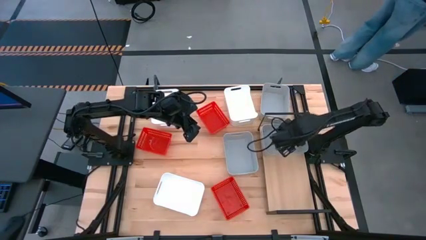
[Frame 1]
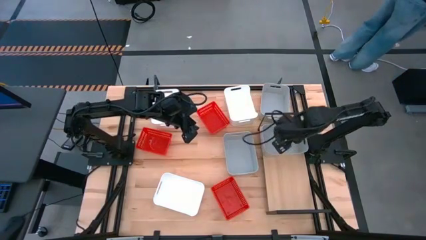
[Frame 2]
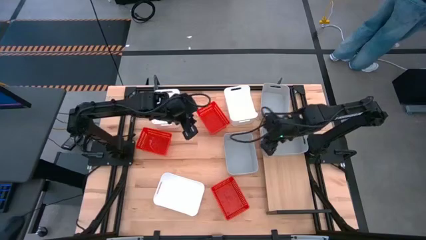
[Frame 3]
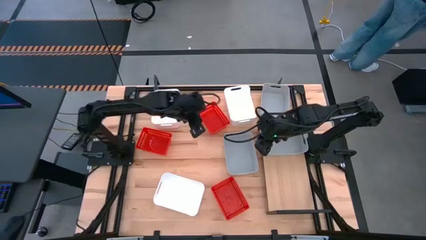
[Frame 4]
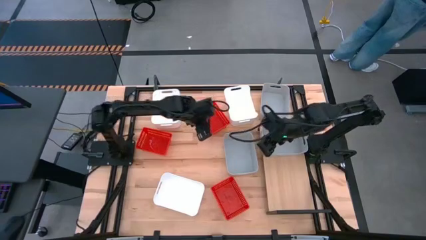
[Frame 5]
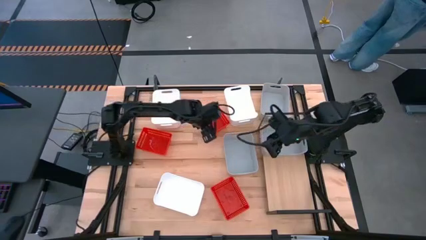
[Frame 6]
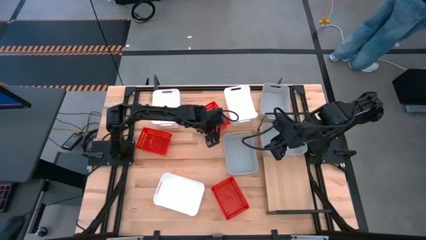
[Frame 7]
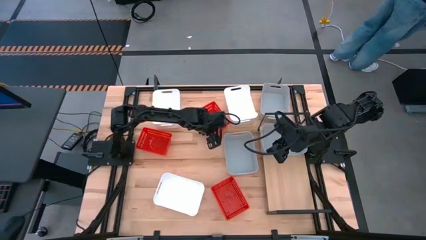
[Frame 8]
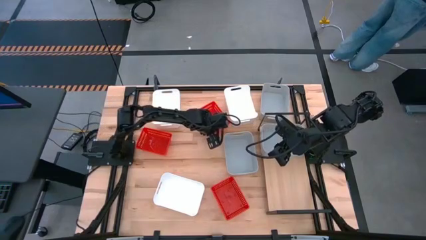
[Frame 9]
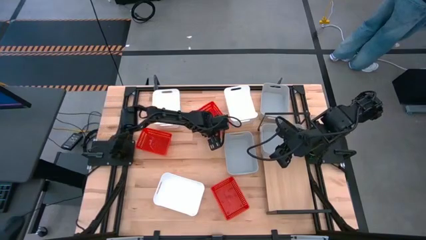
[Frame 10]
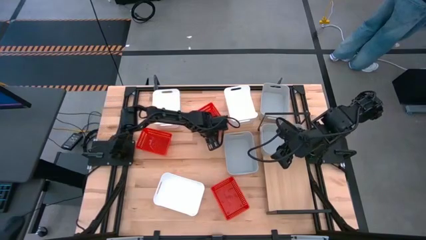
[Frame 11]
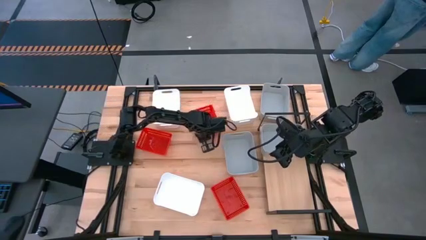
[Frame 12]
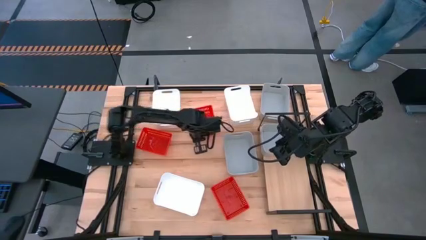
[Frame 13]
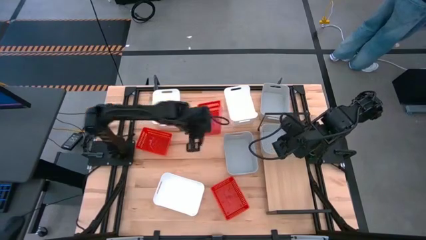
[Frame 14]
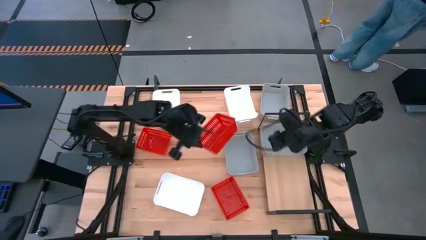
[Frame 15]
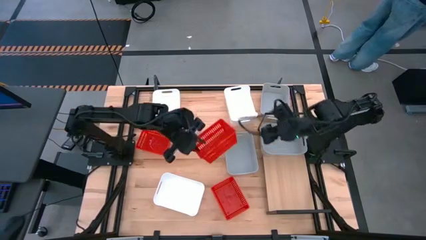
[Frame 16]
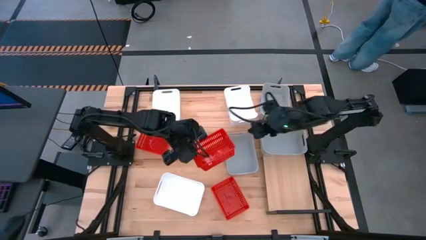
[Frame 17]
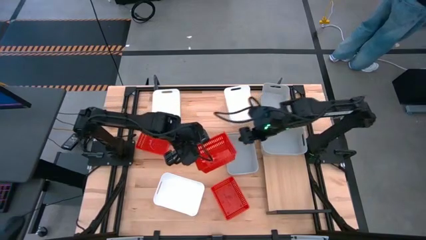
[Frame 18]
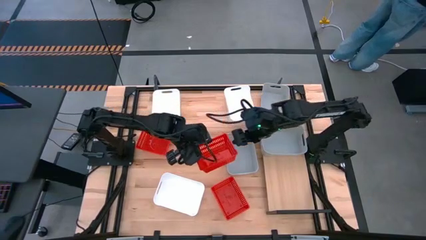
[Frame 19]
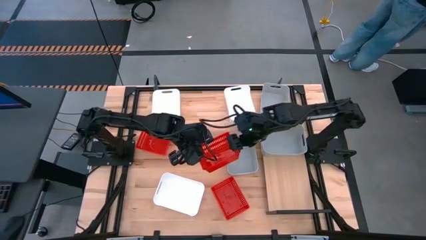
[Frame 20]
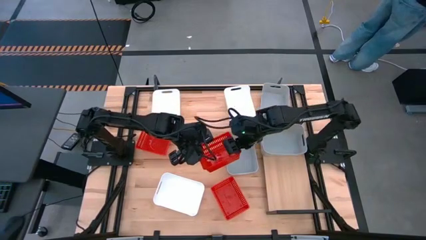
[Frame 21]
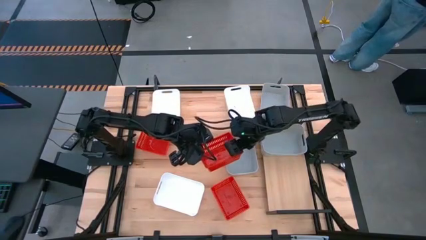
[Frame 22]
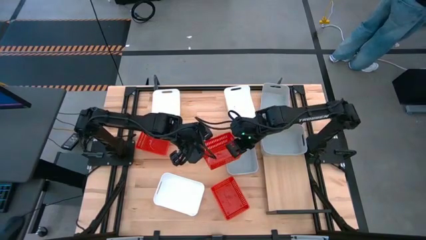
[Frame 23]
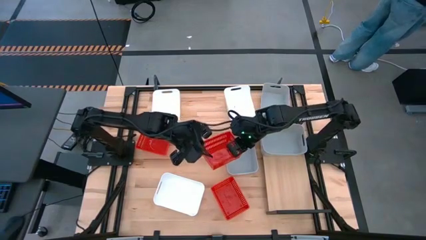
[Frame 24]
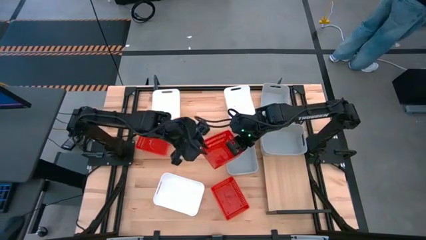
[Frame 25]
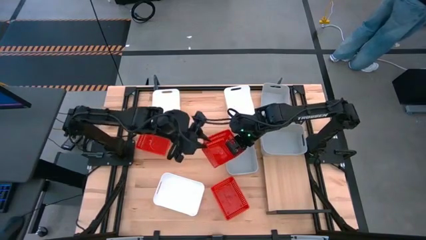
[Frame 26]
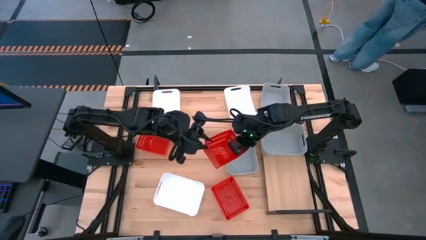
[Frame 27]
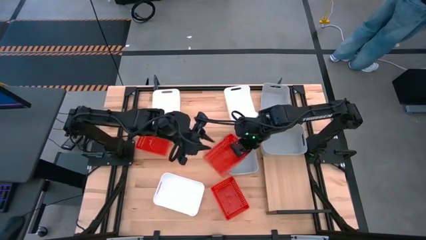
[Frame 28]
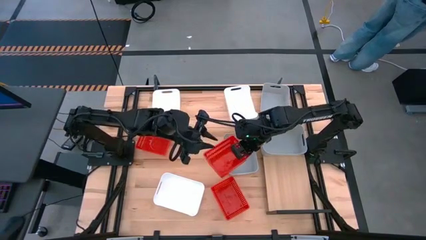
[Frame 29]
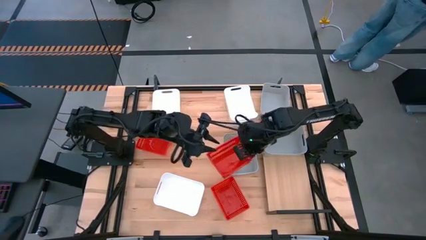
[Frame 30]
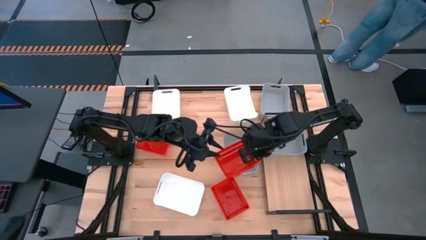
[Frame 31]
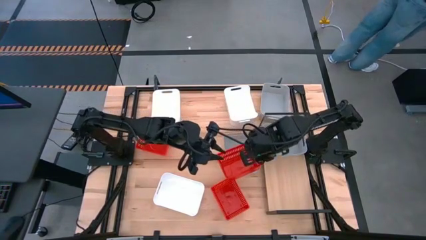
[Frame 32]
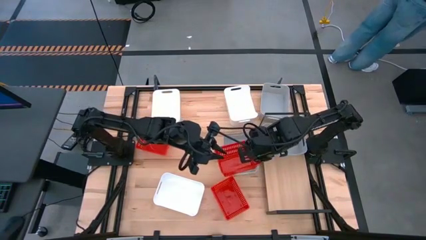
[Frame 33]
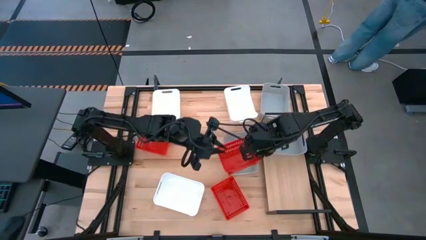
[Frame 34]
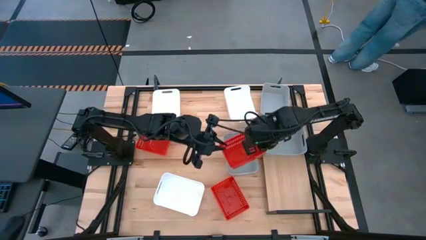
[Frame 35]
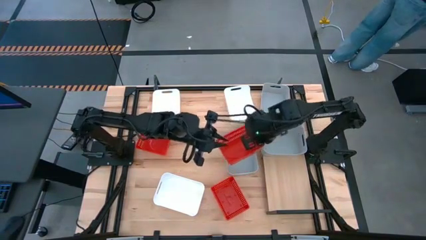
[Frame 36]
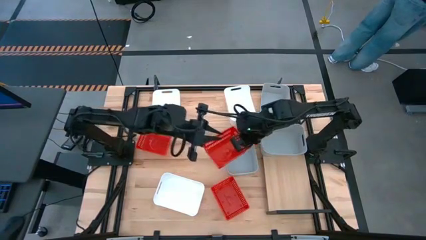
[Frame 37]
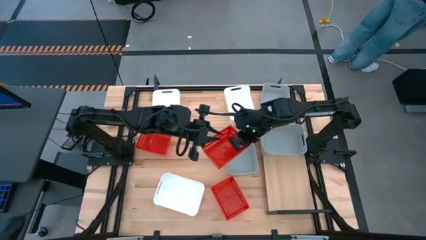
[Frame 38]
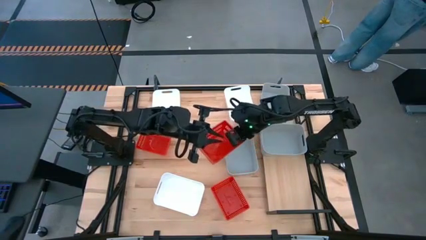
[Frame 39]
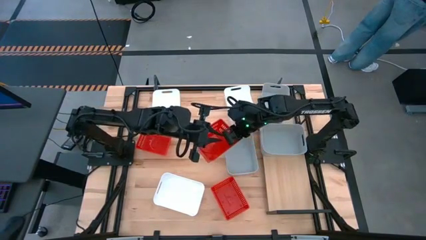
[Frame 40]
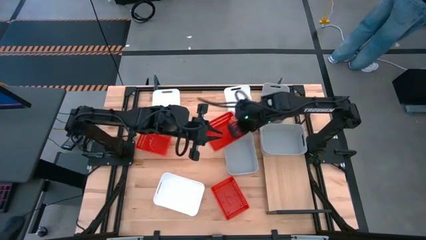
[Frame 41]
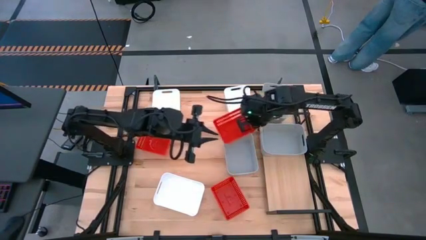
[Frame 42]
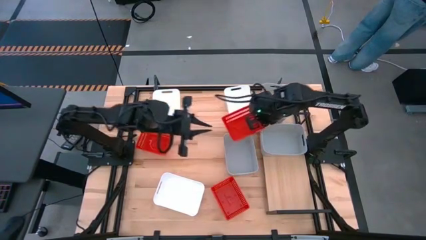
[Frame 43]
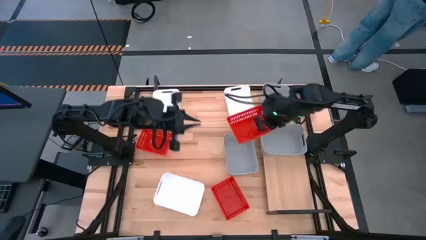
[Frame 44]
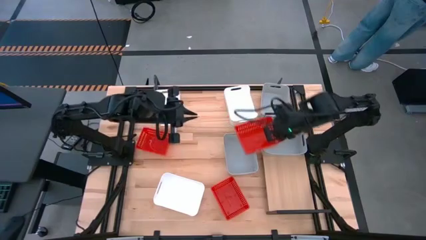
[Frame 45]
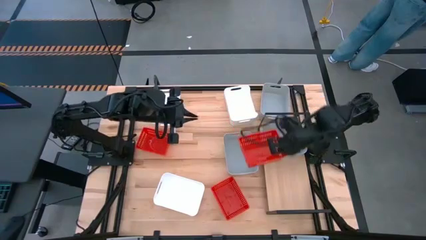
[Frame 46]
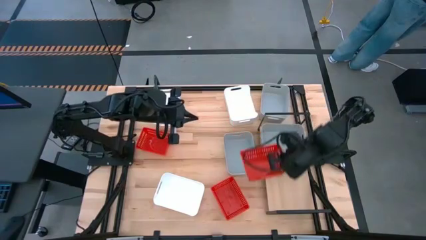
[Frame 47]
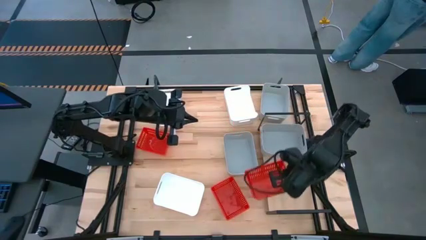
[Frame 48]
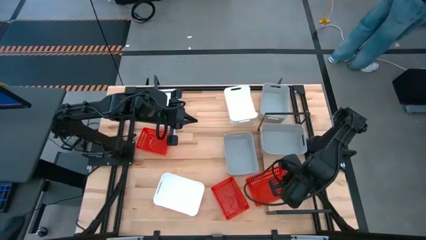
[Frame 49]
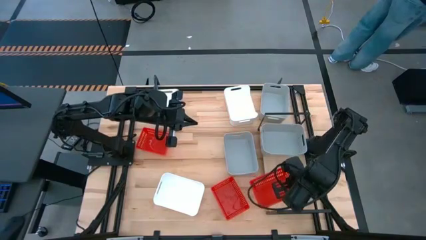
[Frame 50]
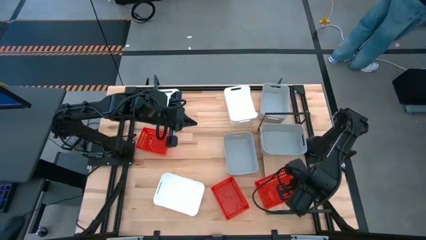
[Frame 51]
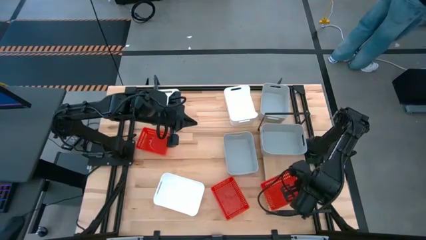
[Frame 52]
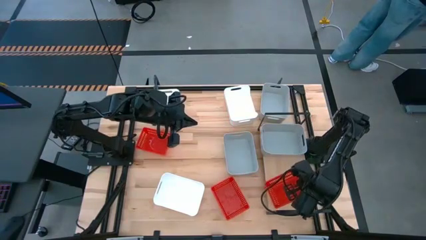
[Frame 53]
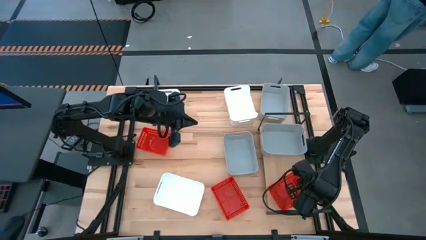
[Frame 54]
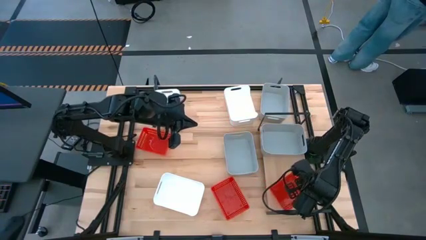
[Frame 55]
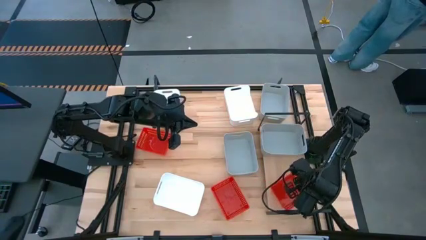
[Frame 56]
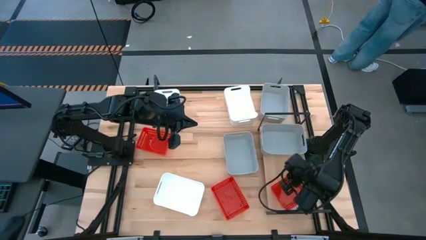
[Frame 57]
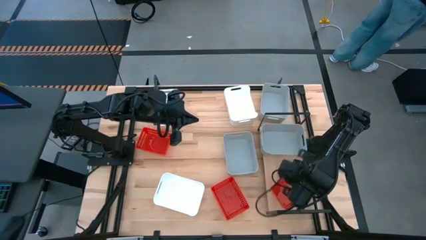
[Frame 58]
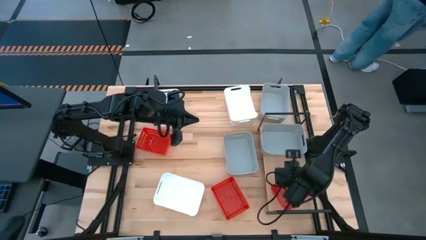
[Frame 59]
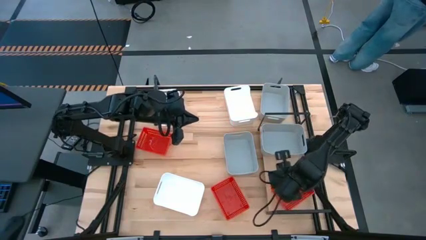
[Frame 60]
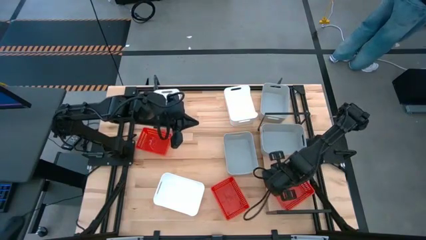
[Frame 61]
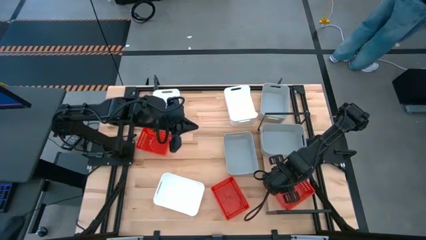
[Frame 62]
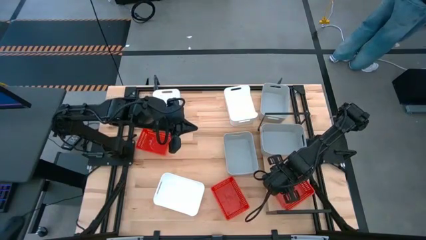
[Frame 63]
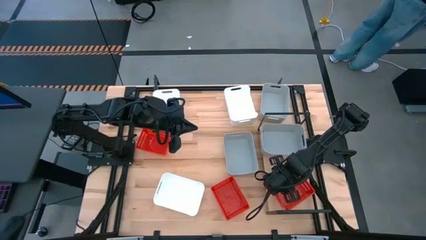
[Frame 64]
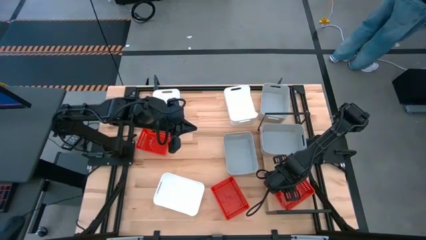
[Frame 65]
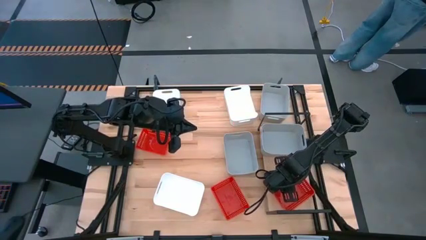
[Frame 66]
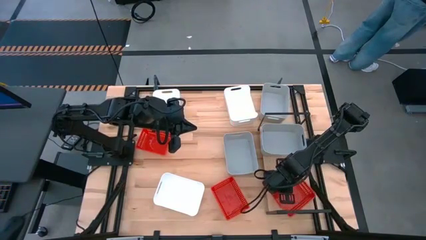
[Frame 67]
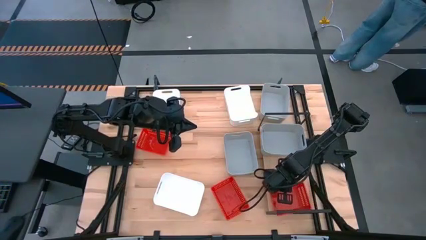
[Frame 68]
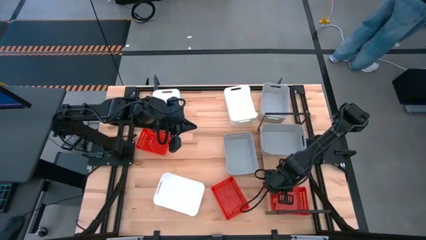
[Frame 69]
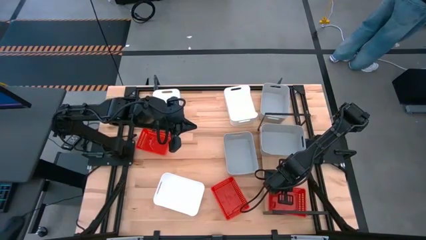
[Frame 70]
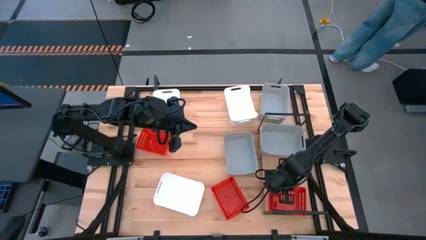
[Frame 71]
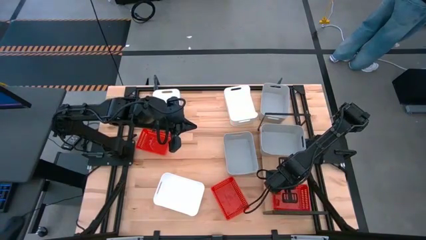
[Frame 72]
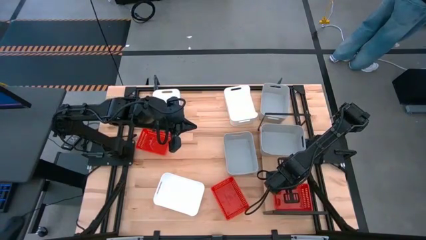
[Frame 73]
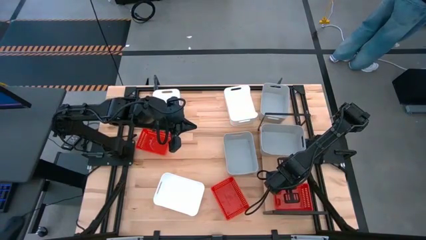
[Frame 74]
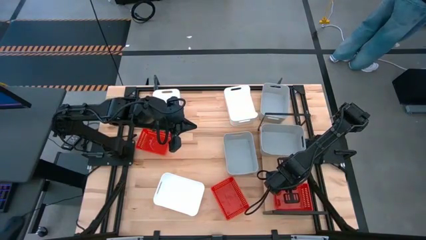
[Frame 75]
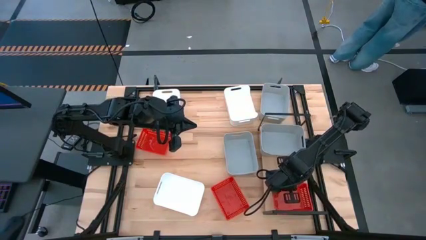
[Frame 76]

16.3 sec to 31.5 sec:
Task: Stack baskets on shelf by color
Put the top right red bin on the shelf
